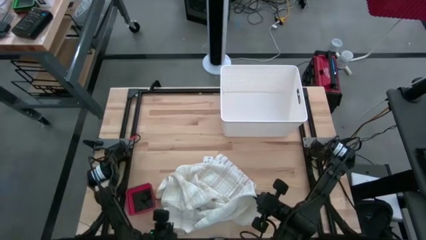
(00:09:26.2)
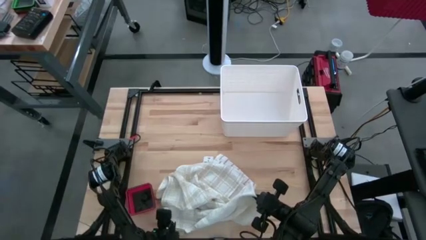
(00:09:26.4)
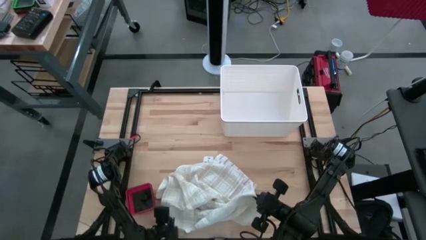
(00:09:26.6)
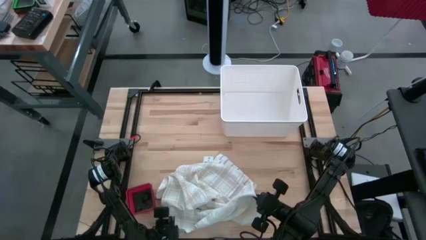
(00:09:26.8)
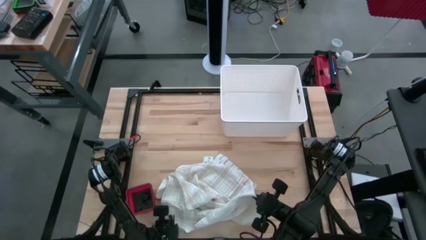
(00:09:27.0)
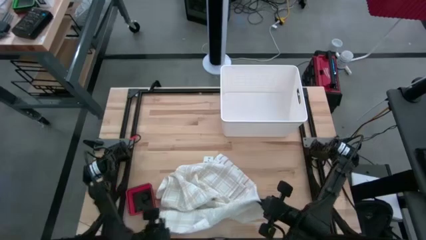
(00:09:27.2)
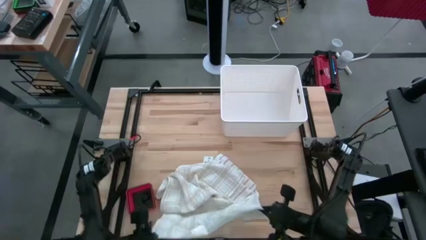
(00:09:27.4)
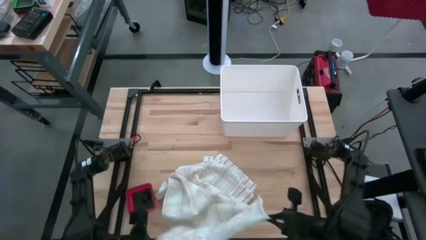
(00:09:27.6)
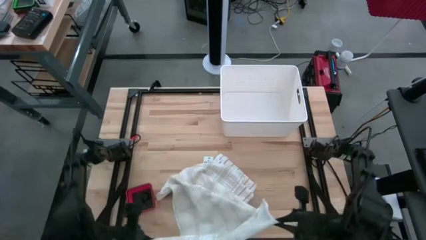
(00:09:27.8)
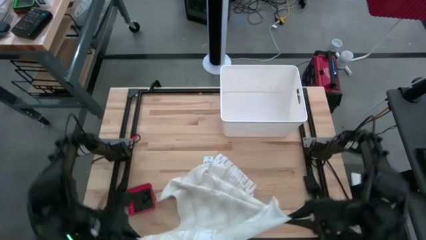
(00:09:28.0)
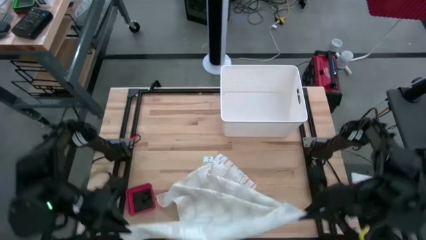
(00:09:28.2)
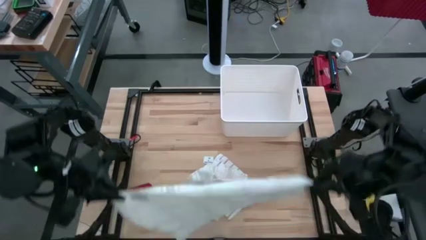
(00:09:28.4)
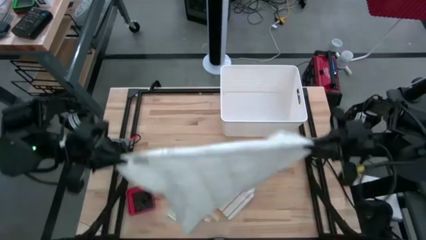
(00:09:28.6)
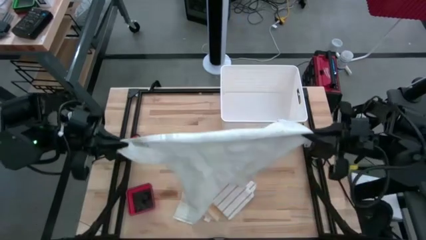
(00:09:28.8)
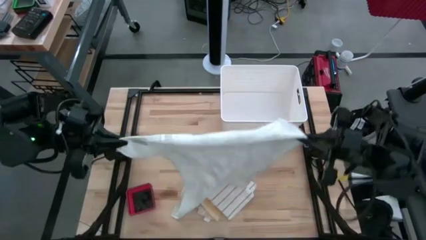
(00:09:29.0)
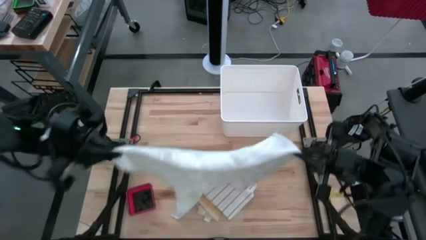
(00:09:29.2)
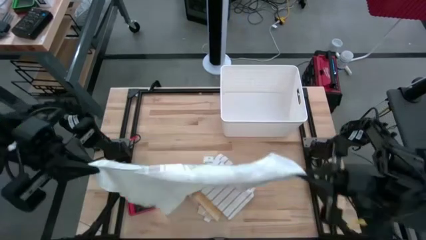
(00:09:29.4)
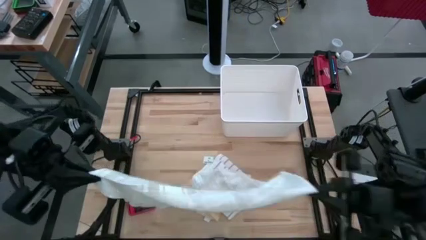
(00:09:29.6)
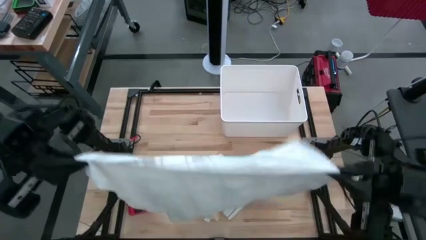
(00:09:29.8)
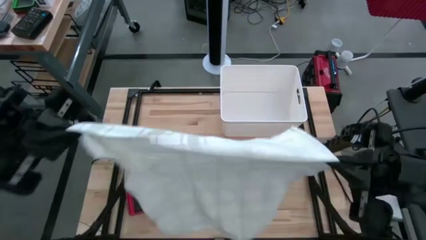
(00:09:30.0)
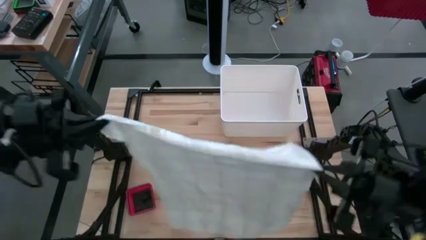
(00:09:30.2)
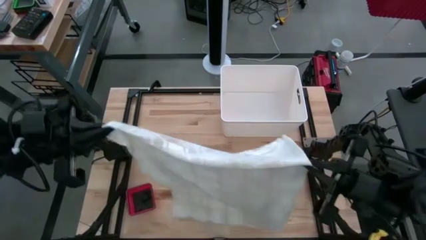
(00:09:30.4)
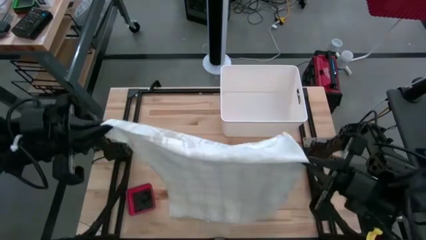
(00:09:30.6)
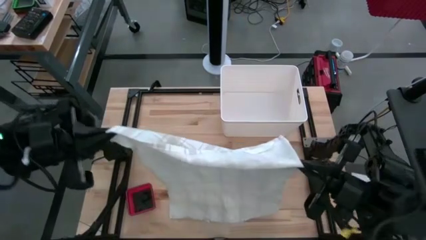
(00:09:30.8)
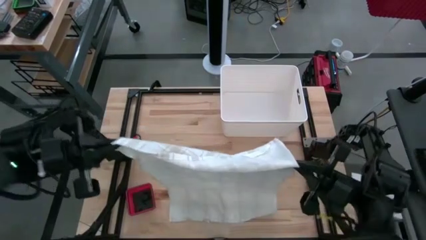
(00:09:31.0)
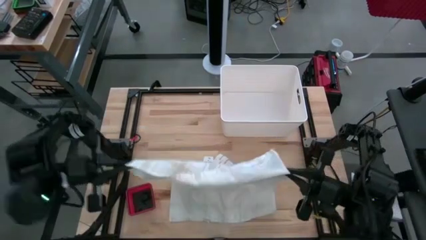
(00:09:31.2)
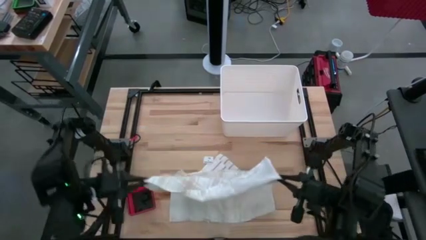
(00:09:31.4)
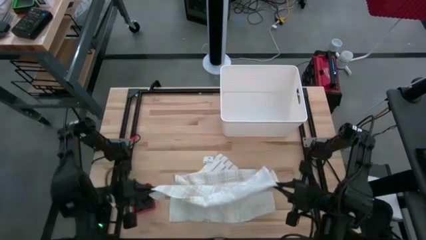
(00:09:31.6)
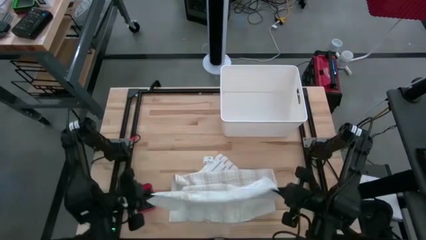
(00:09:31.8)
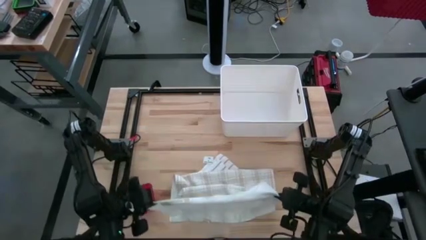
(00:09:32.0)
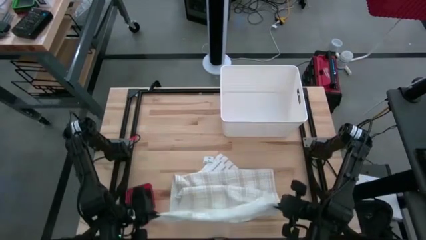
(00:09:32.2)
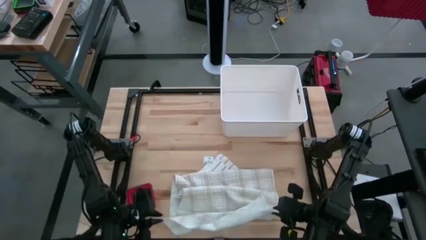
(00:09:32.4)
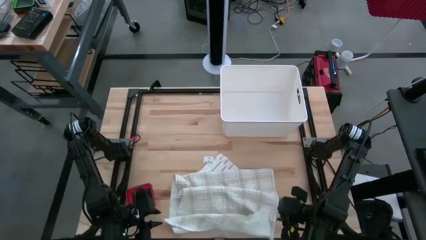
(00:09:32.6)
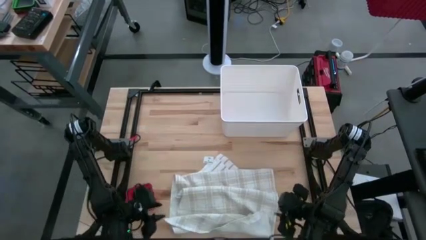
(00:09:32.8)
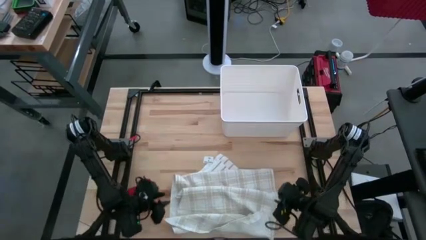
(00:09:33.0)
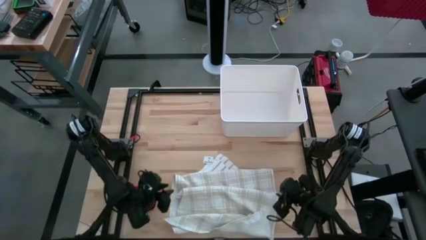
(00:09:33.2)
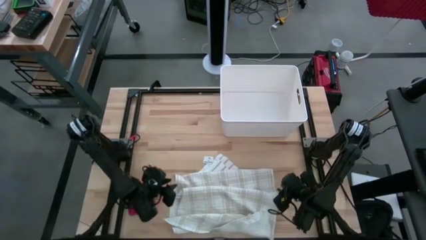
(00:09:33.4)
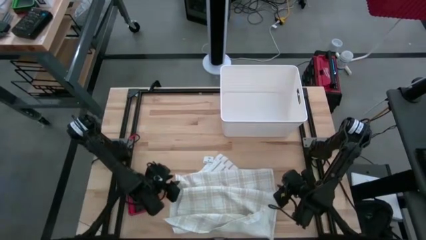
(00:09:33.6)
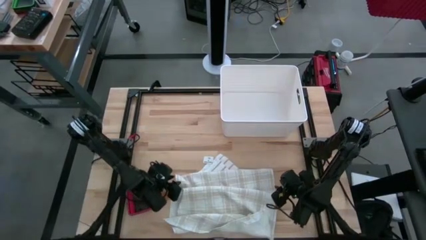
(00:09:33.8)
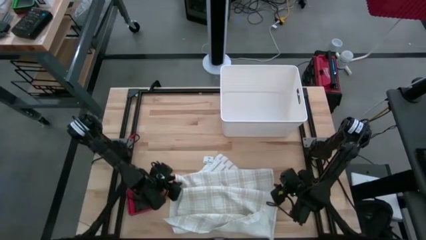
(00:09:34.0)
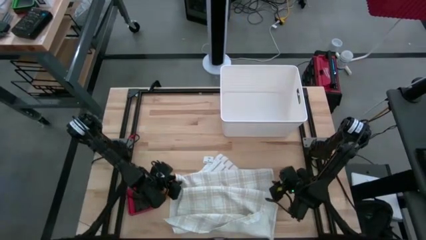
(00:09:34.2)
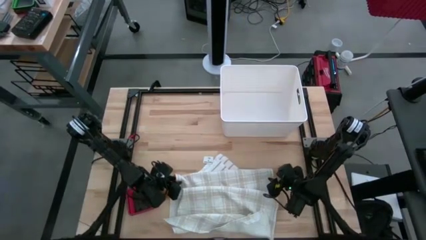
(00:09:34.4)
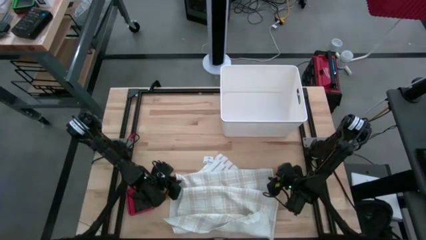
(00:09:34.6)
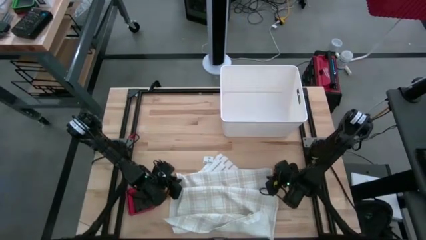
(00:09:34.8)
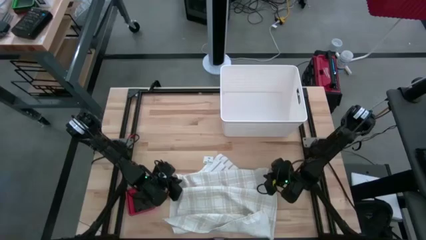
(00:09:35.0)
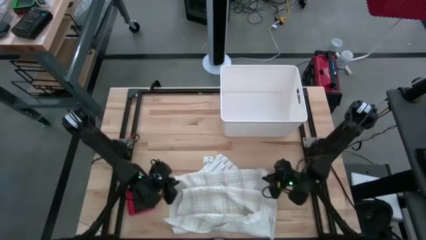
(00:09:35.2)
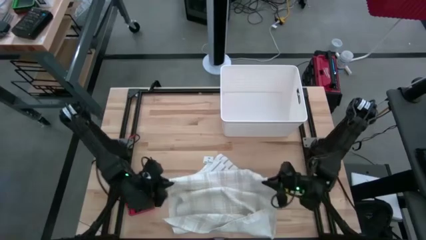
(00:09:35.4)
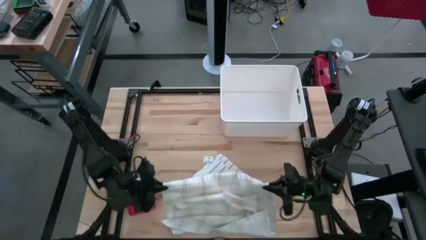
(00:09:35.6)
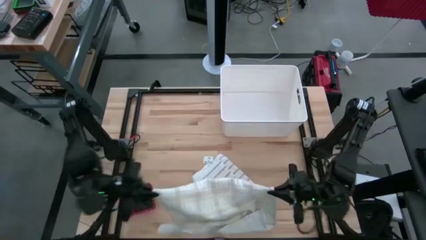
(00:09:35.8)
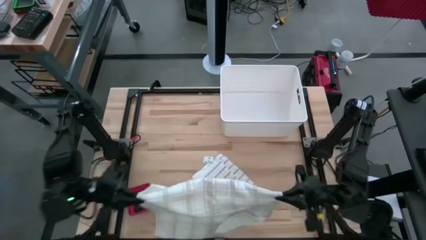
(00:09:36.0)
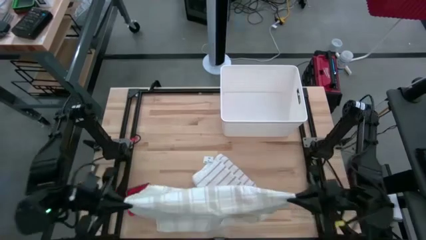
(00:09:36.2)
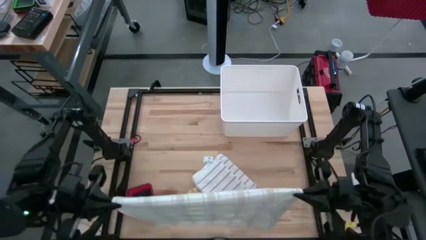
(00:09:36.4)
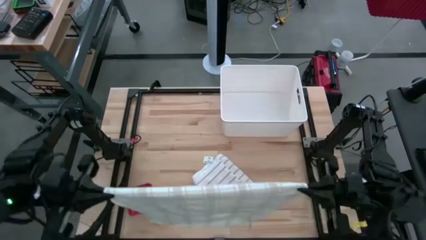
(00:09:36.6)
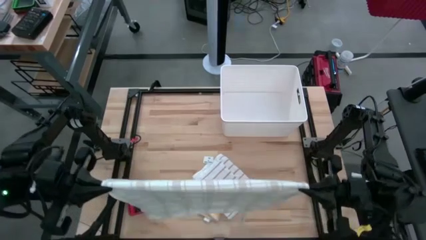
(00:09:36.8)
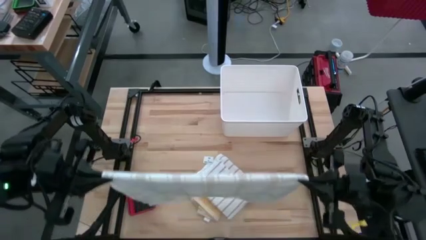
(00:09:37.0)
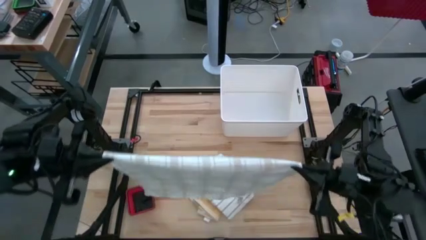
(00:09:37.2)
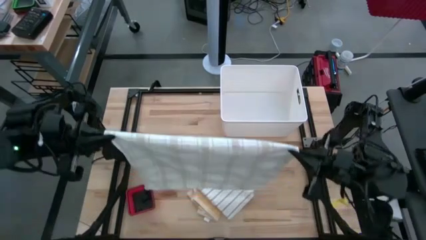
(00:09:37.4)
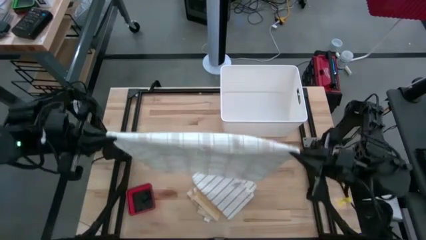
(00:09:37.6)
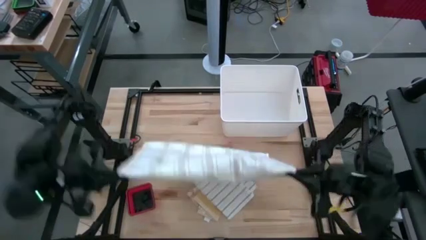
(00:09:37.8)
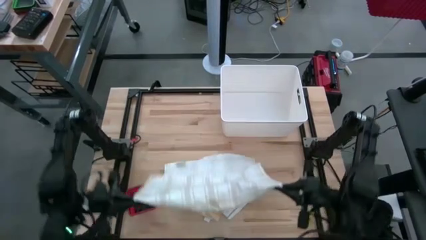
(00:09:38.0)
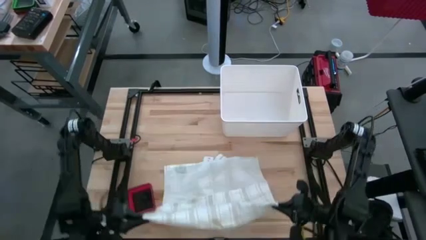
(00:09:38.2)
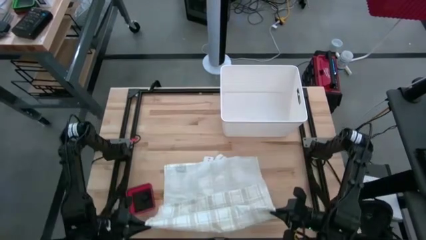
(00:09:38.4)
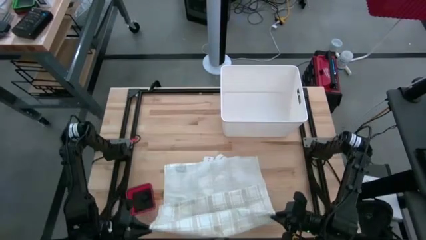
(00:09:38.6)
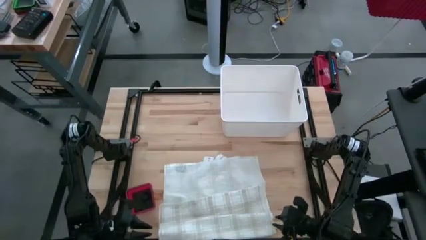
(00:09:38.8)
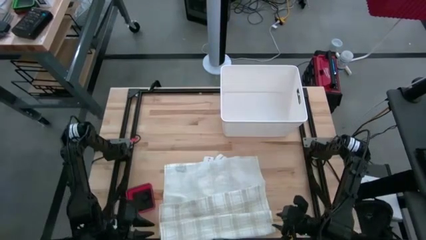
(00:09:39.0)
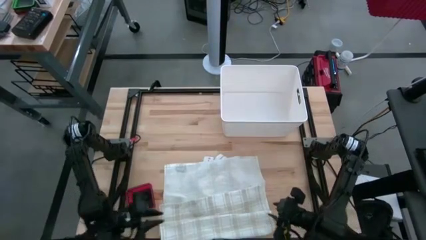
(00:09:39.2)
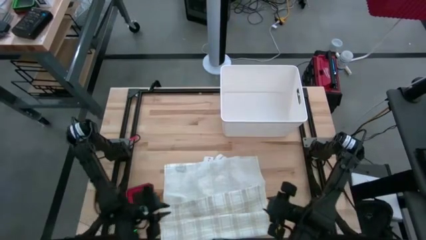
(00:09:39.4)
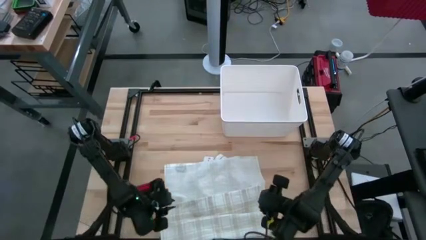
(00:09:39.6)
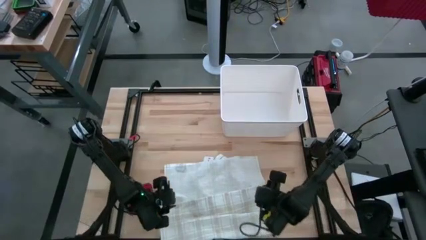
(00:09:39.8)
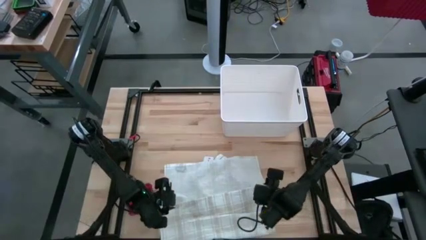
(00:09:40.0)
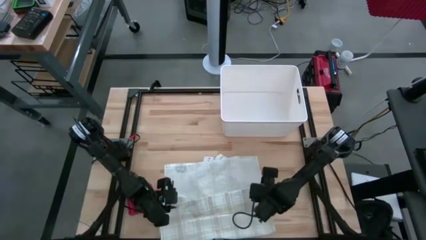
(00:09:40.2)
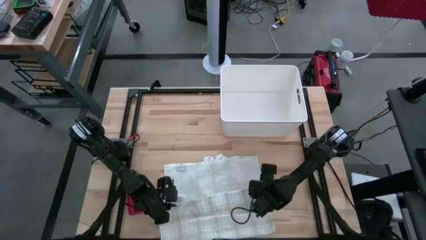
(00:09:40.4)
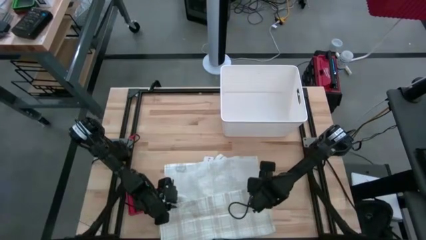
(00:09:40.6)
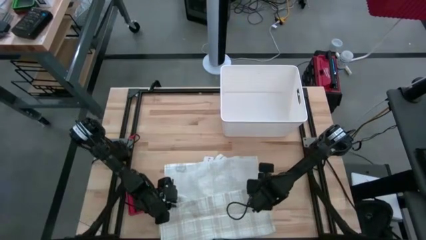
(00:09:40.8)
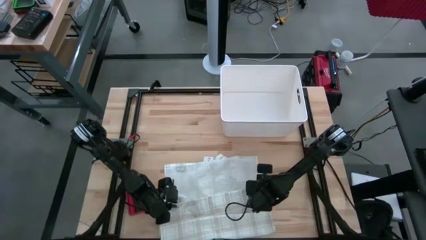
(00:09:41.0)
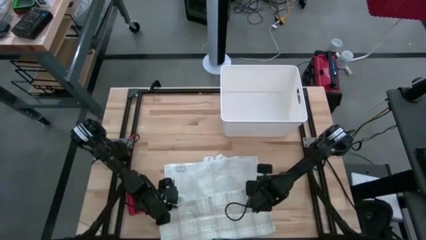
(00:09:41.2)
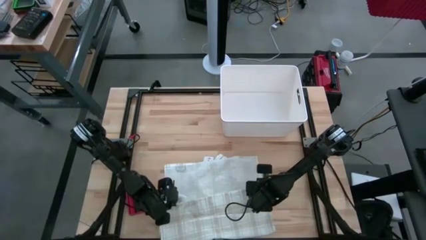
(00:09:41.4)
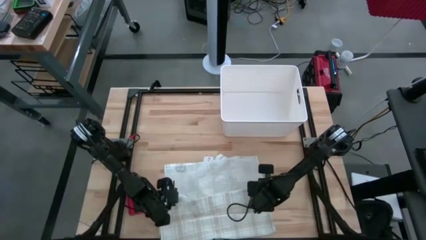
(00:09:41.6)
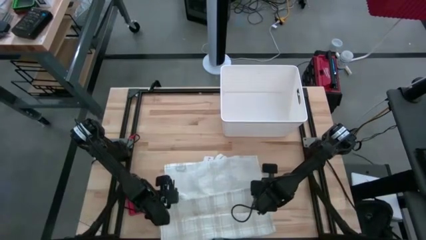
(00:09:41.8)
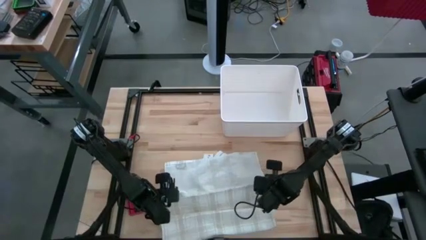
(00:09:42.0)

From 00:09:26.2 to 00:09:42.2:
Task: Fold towel
Fold the light brown kitchen towel

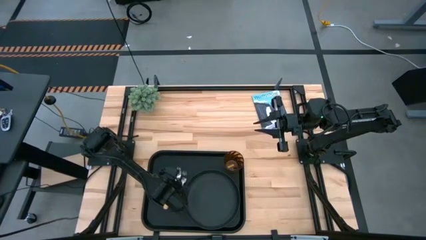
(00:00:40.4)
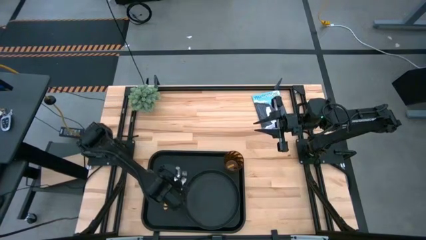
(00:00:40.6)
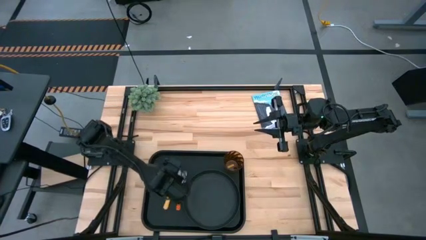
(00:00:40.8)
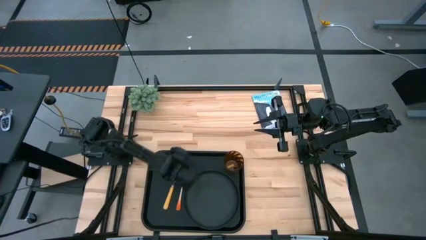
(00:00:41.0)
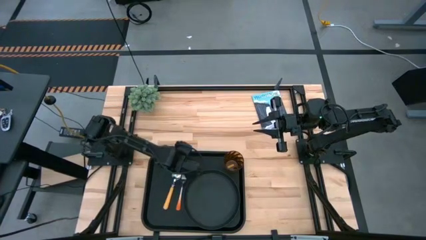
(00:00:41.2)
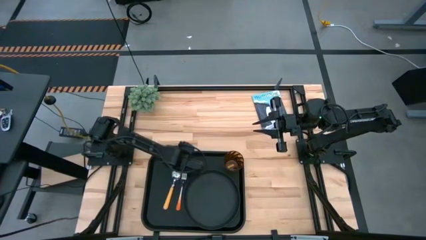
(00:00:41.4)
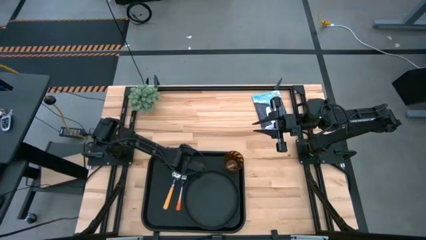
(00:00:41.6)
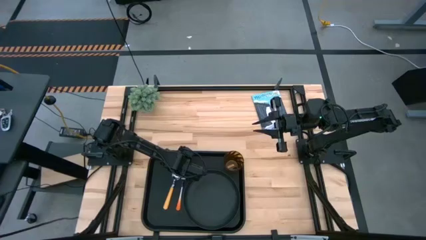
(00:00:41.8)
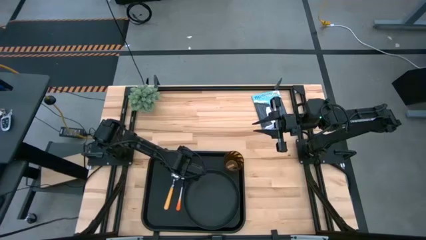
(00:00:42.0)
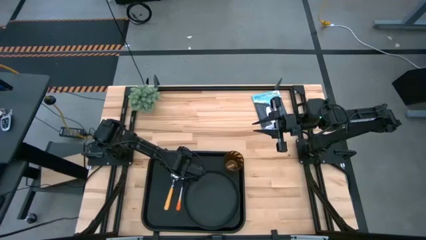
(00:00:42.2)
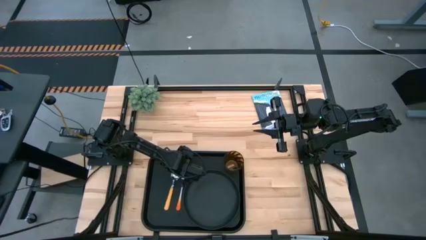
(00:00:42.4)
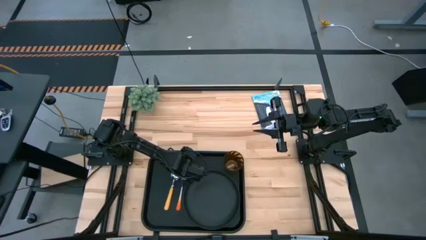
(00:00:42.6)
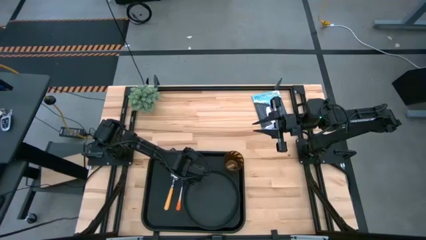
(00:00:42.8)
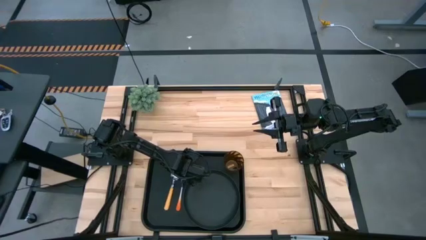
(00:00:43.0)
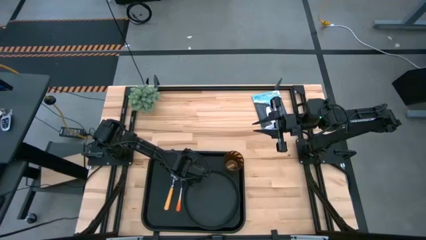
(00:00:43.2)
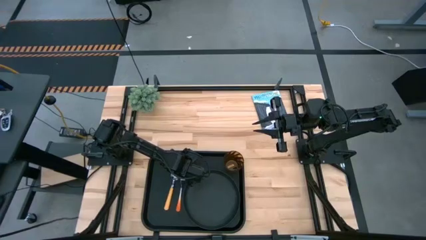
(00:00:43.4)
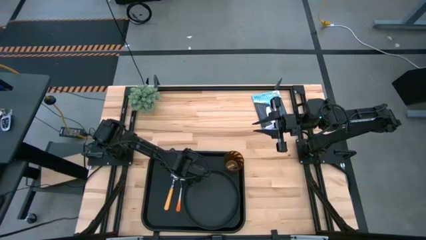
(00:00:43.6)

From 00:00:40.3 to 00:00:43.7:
Task: Pick and place plate/cup/fork/spoon on tray
Adjust the yellow spoon and the orange fork on the black serving tray
